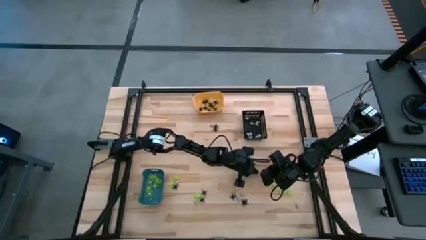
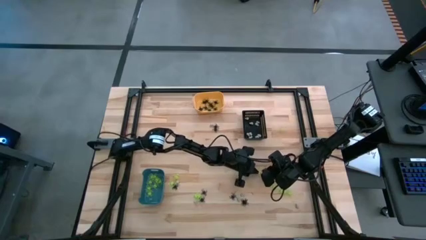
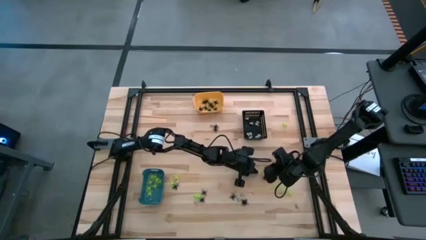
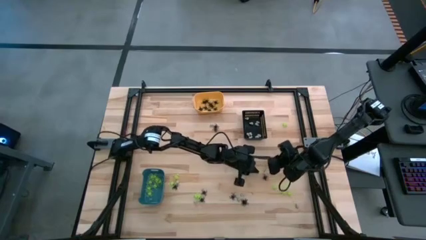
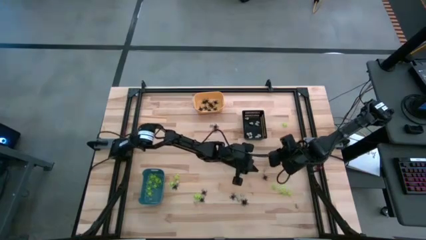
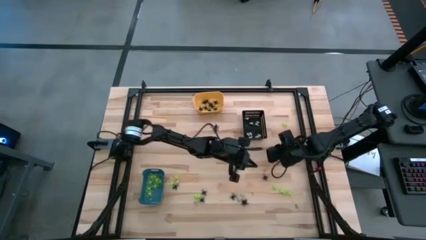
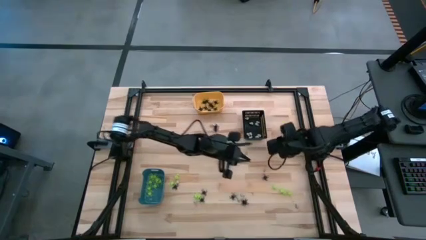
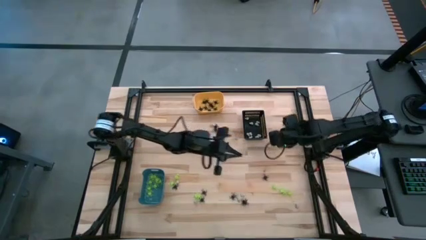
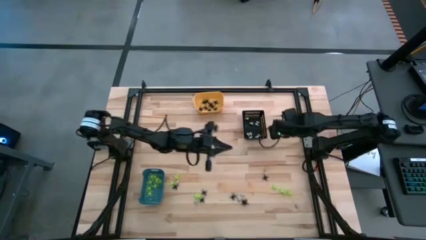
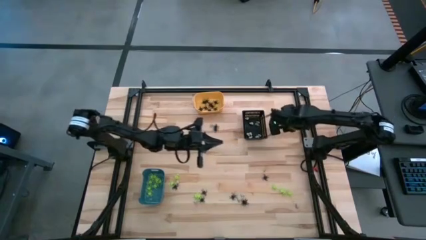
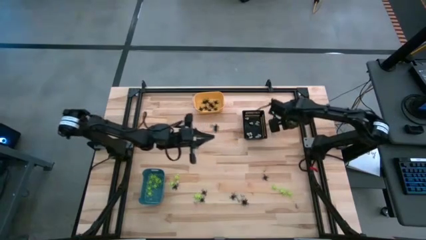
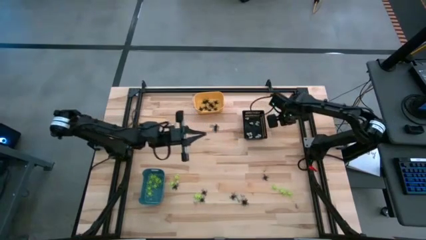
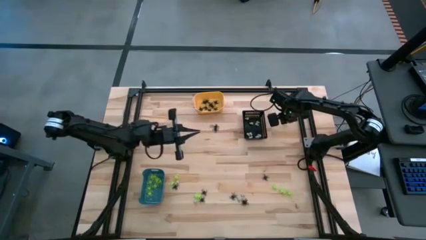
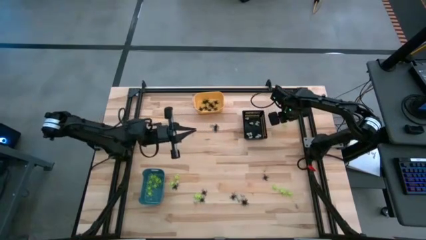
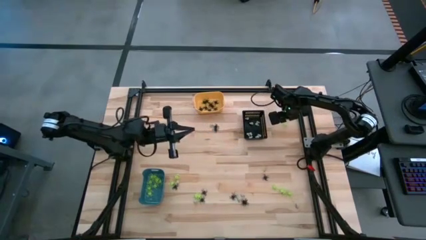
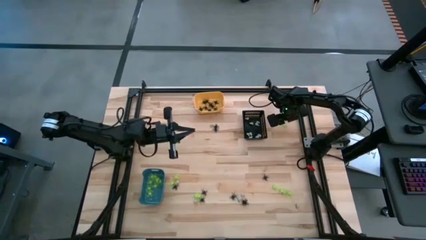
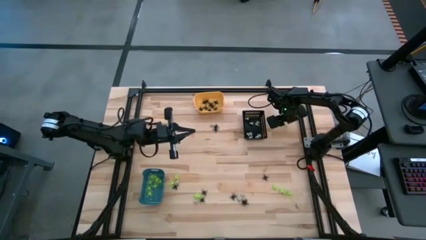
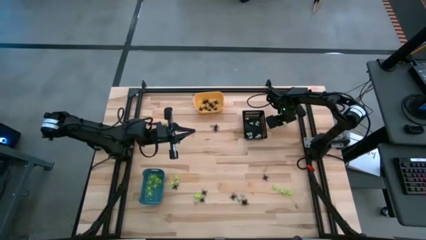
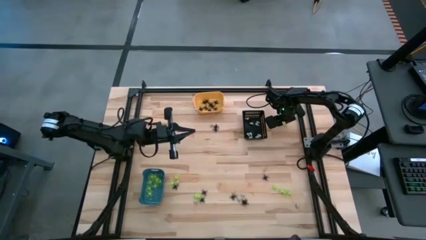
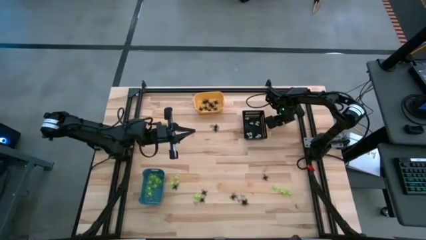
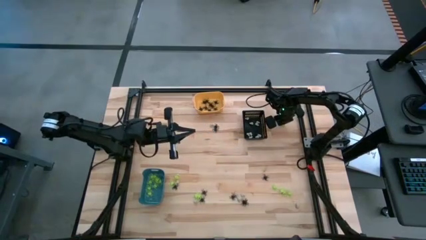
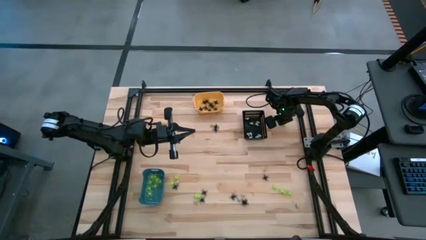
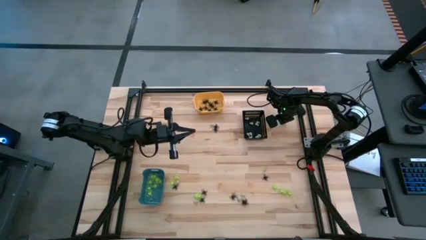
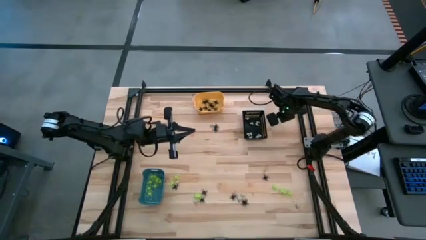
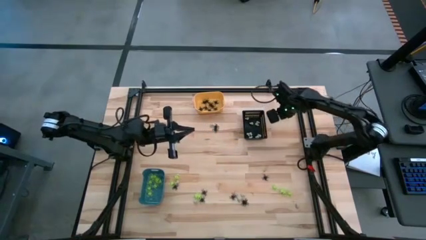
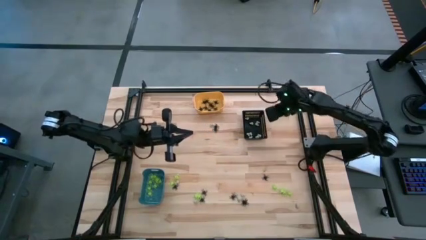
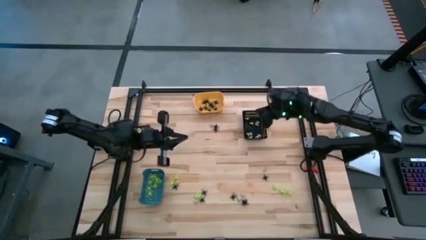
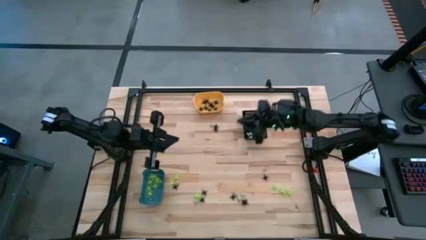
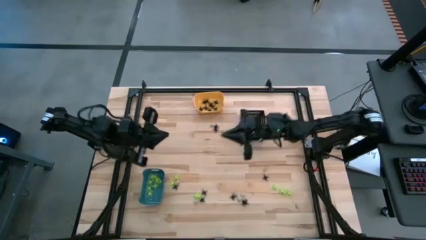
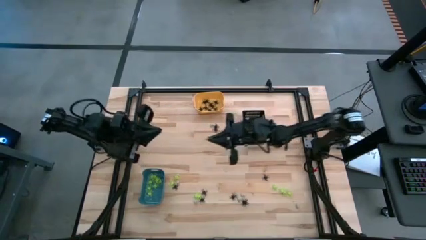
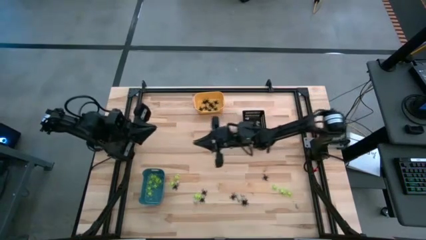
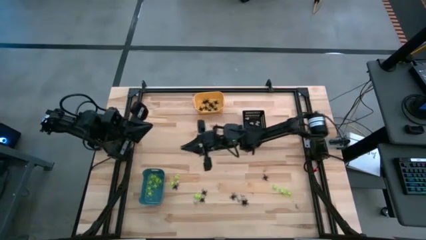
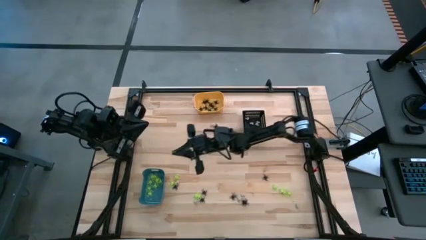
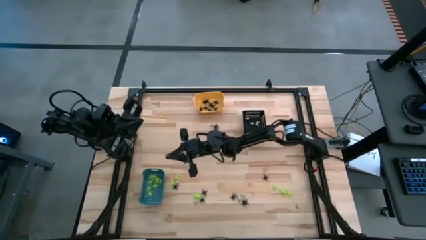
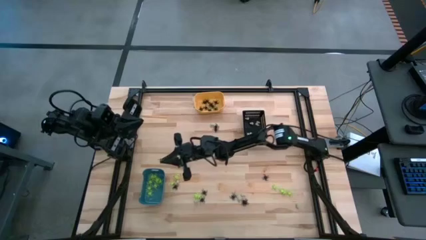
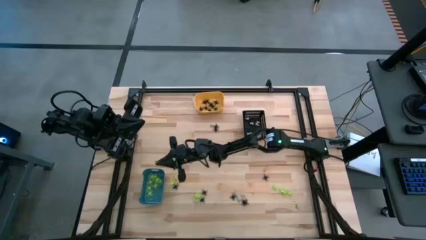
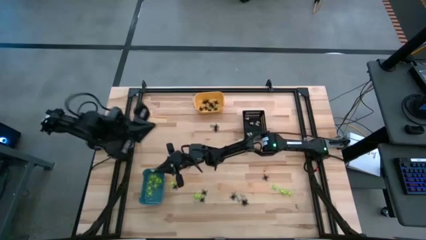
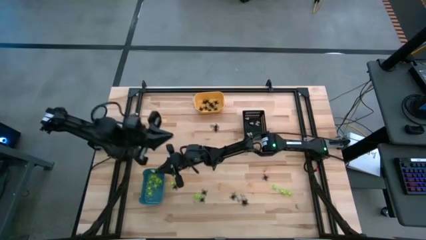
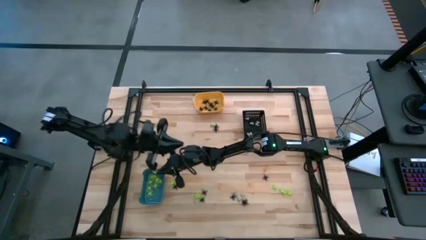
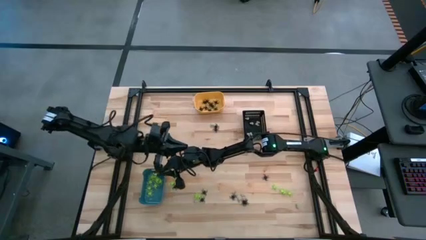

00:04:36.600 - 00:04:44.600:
Task: Sort Halloween decoration
Put the green spider toy into the blue bin

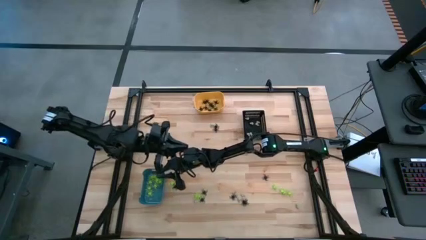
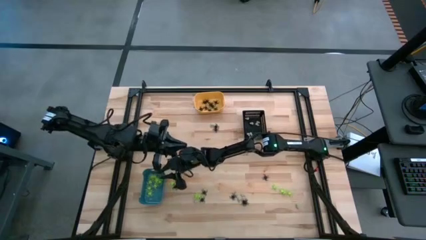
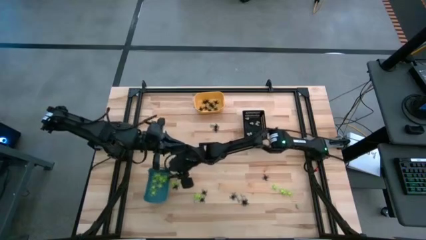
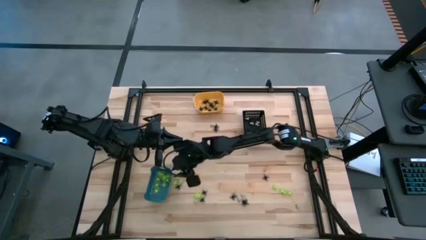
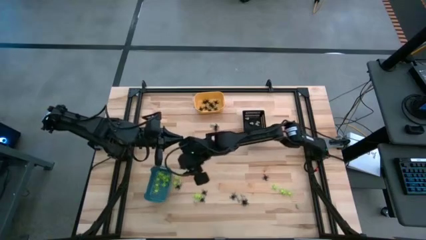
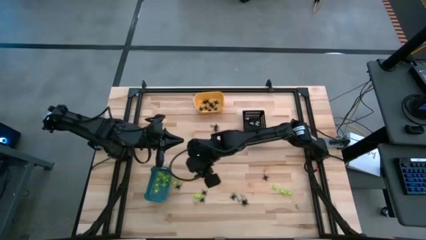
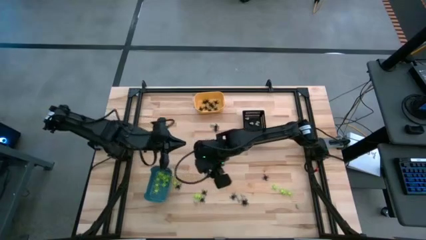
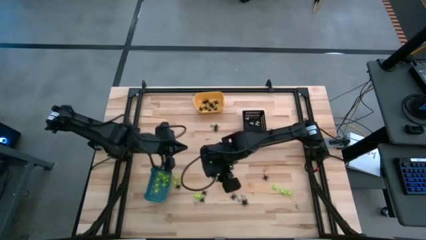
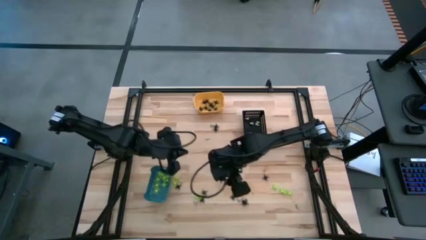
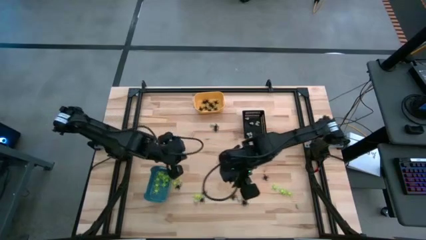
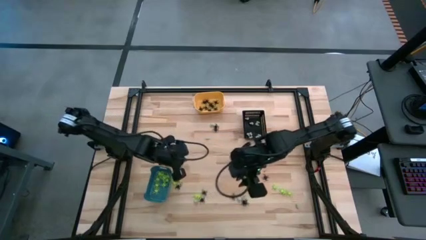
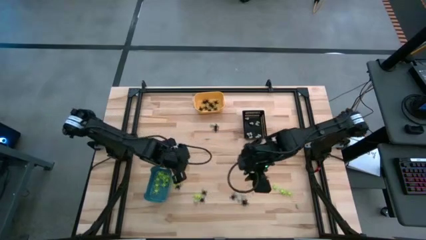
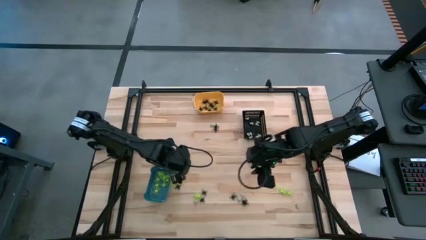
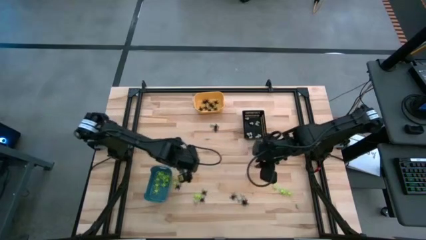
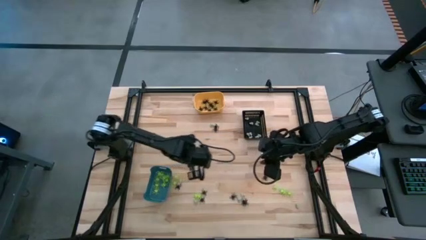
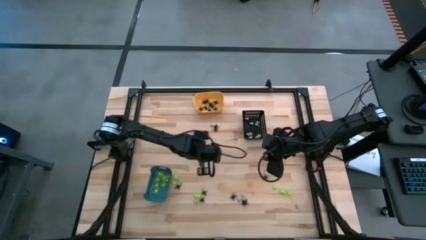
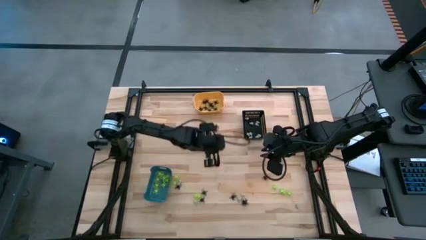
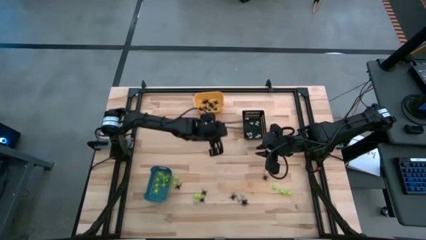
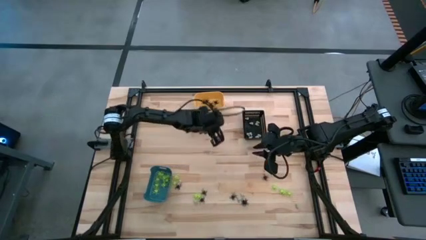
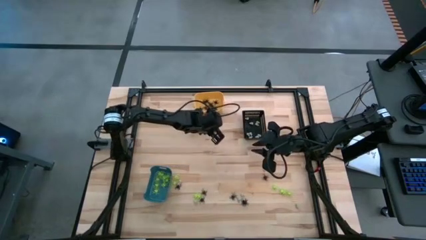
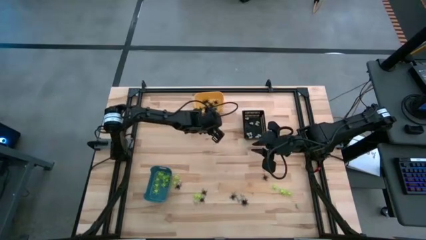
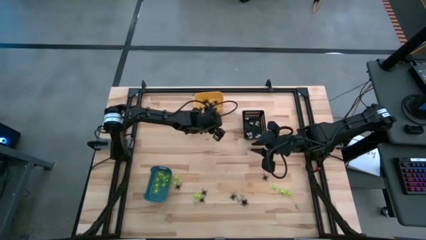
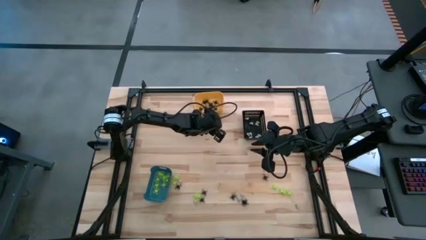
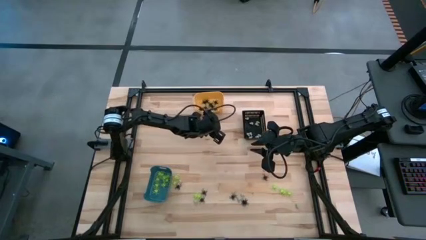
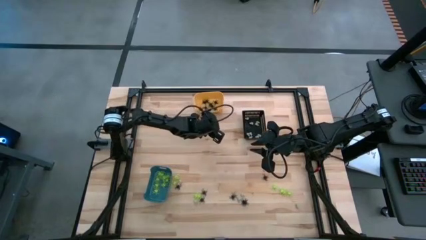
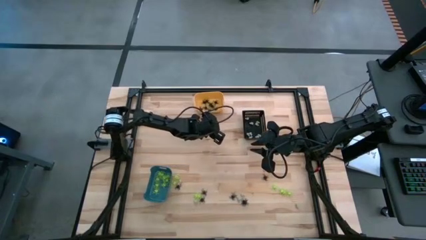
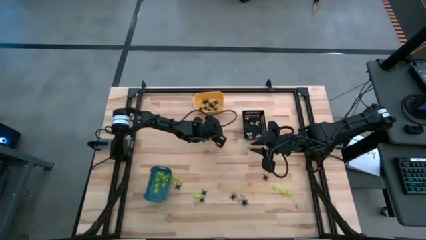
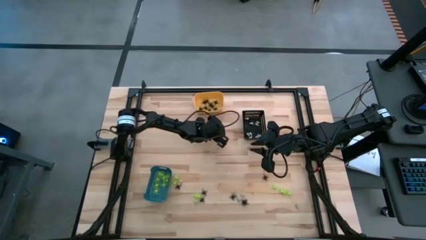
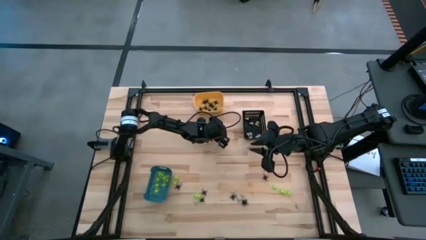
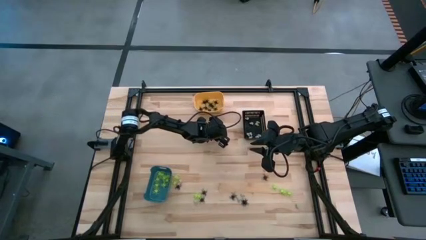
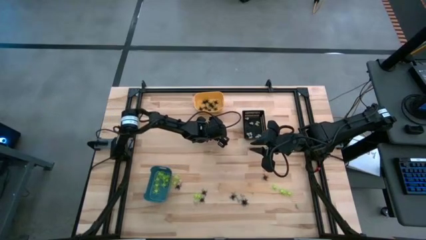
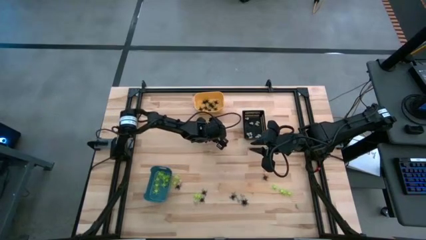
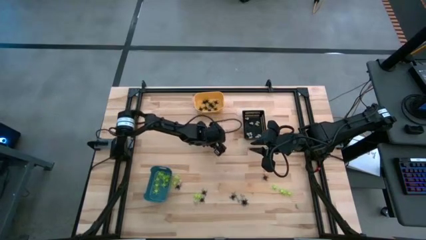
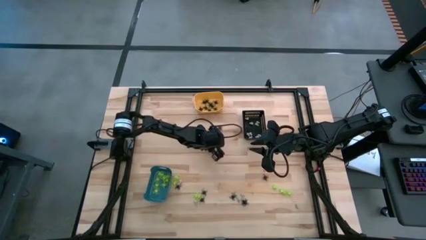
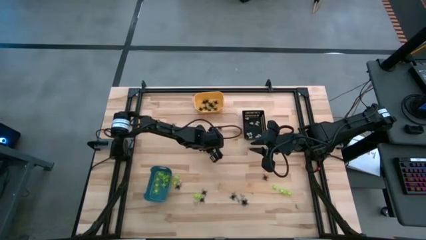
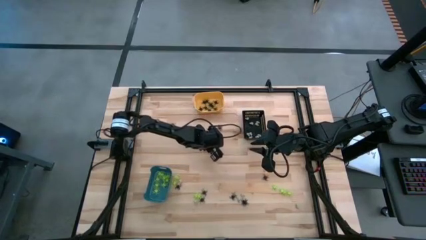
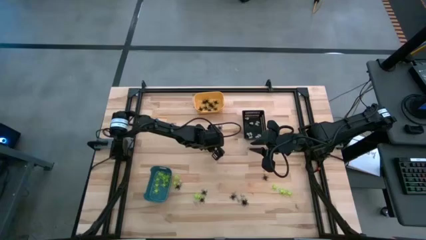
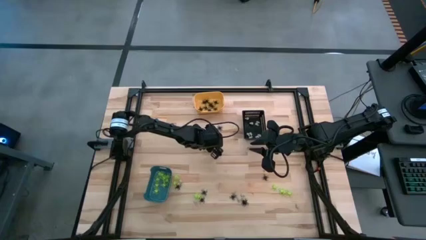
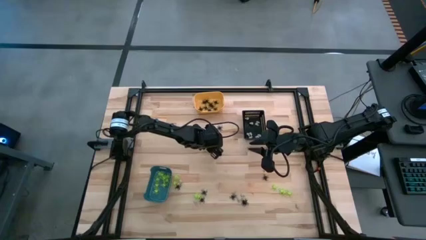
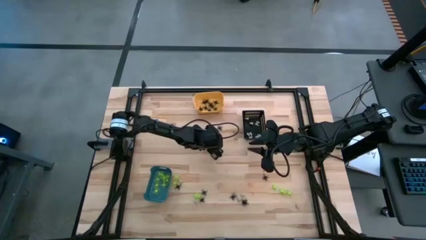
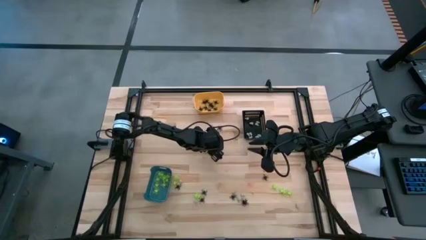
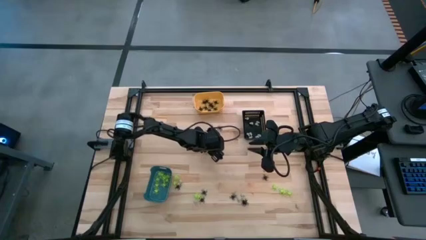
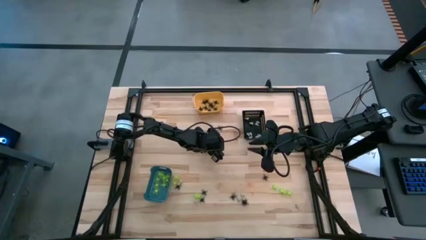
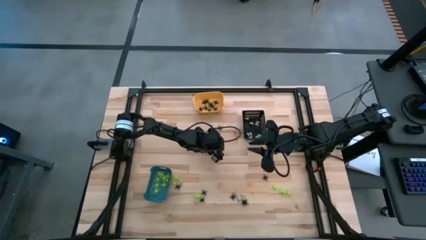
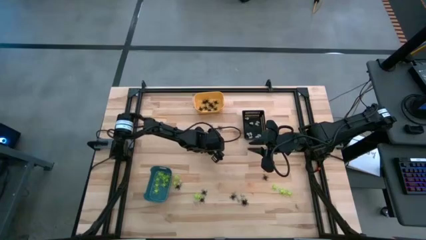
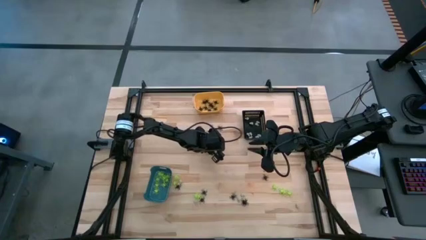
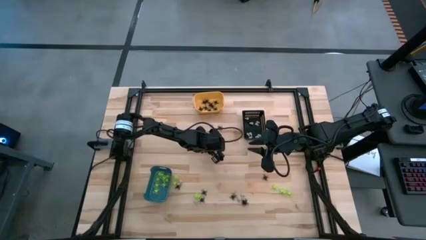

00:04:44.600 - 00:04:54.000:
Put the black spider toy into the yellow bin
